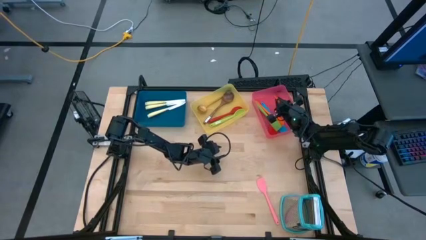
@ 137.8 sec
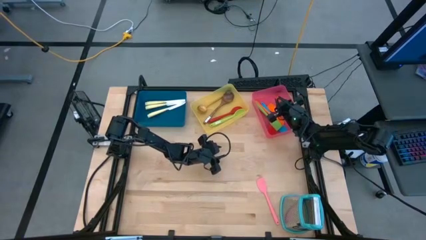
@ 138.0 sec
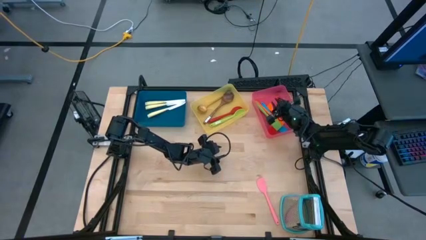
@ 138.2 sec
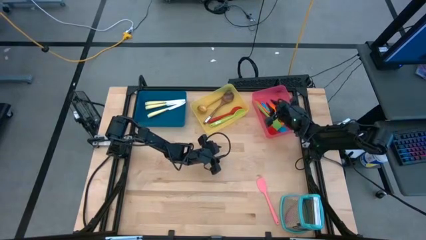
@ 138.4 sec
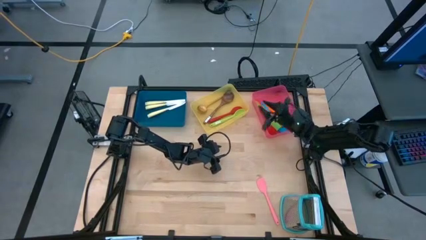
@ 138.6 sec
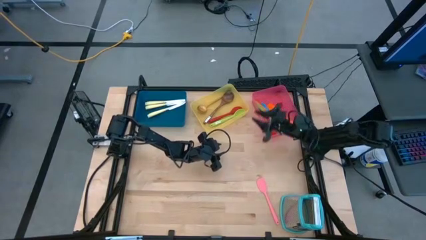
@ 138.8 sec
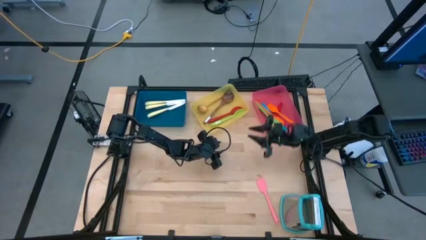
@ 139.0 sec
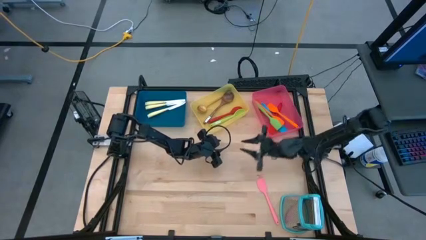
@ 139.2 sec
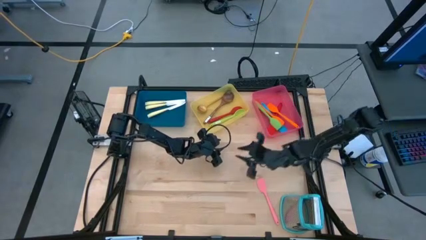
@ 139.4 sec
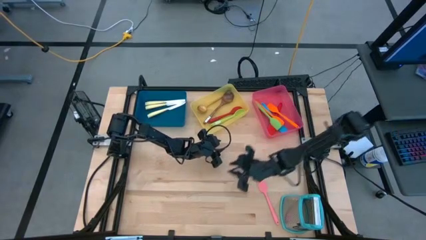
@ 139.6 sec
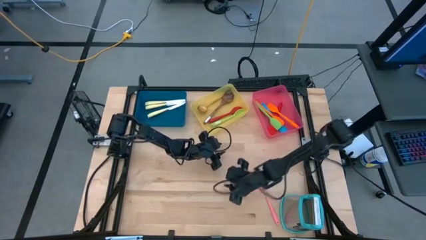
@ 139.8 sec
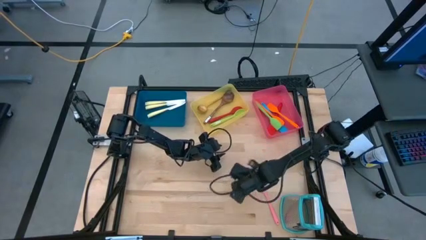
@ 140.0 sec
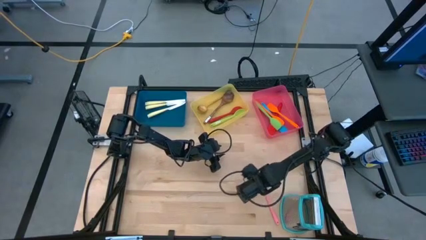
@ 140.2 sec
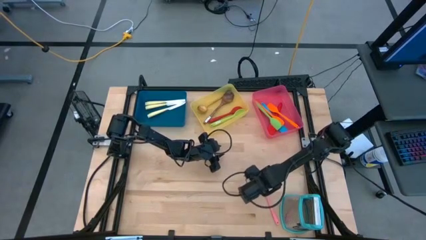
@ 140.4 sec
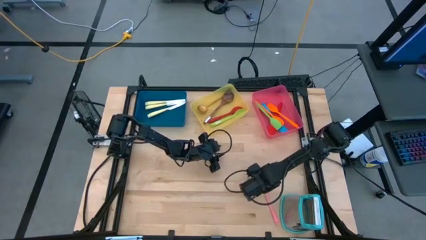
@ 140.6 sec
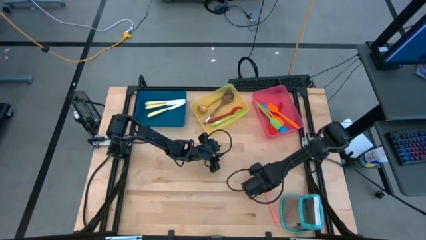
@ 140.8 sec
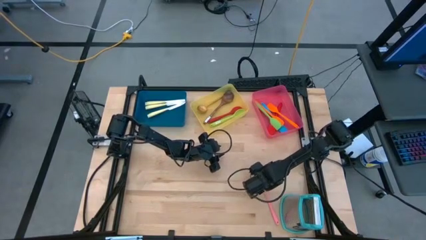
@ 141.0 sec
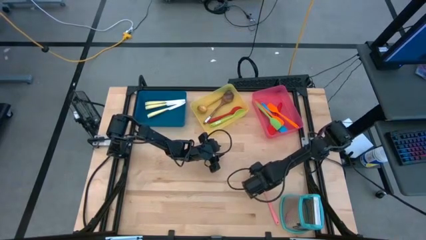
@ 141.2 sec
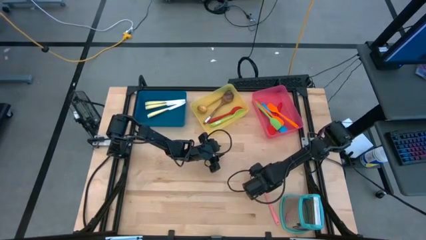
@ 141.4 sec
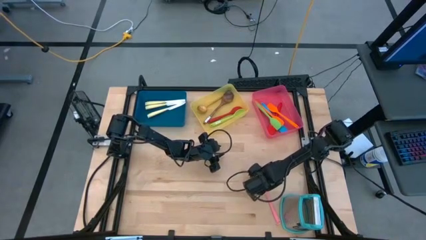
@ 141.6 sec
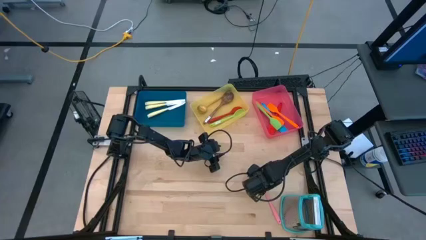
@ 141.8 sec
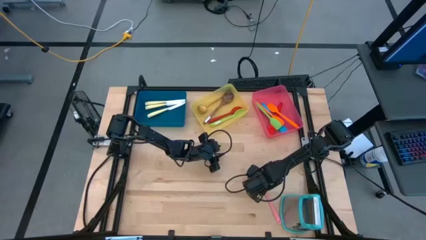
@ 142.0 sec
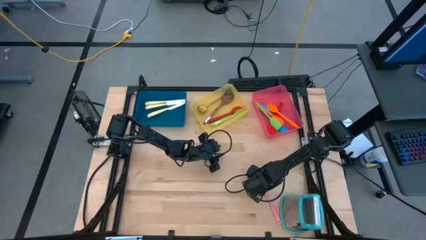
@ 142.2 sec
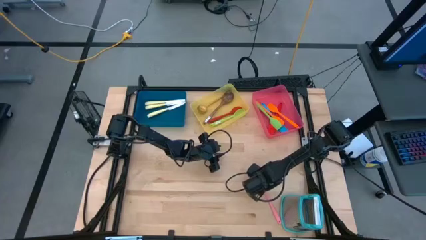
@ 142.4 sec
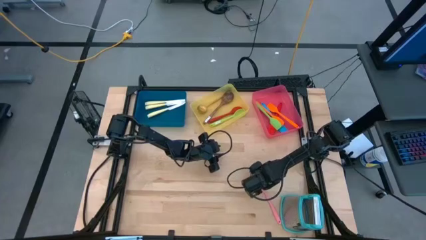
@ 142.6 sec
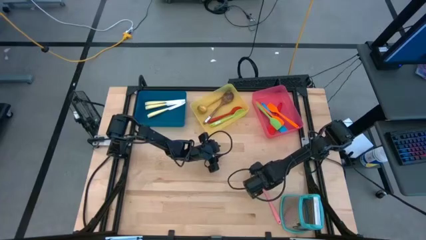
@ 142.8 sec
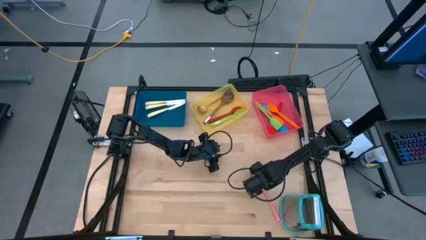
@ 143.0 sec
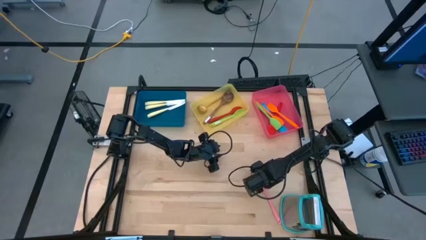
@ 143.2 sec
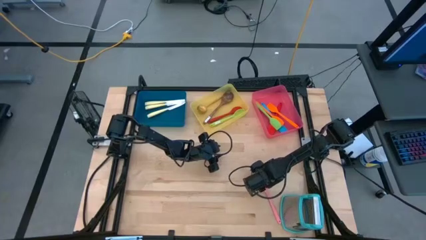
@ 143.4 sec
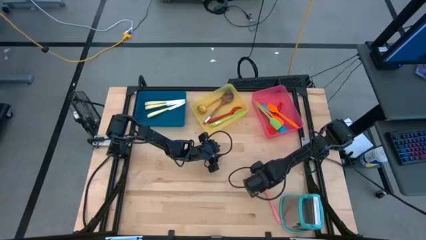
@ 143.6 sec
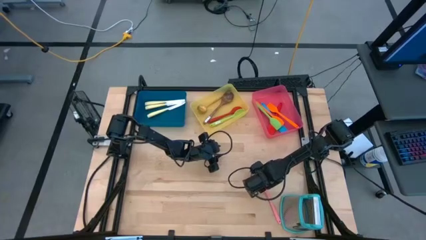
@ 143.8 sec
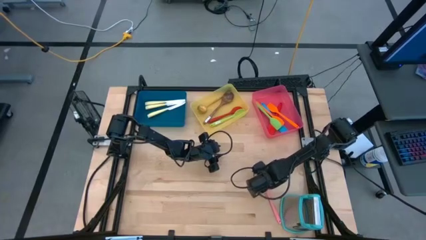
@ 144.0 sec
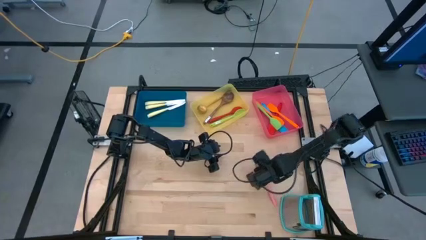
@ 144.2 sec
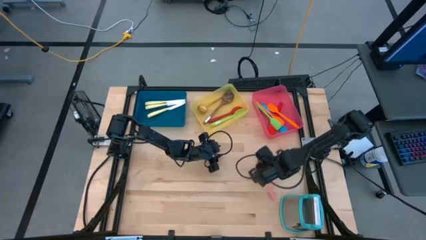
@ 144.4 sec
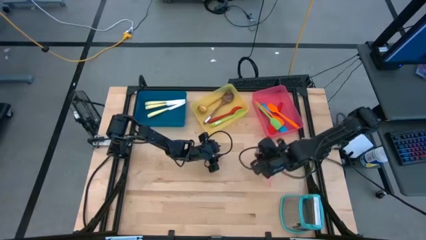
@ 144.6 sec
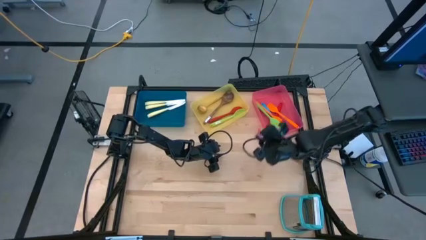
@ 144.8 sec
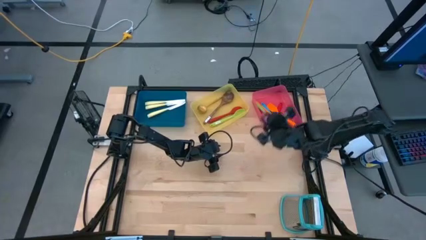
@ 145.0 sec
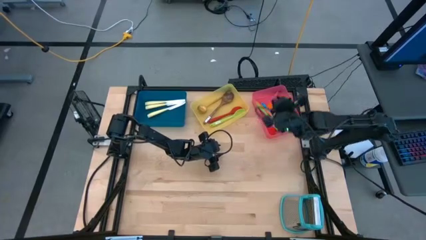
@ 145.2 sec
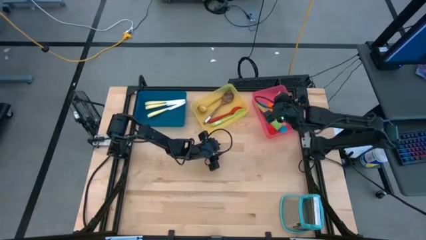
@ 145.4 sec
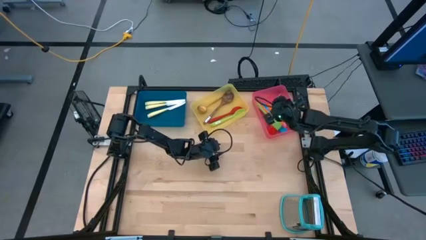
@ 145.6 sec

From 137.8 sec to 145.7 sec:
Task: Pick & Place Kitchen Items
Put the pink spatula into the red bin

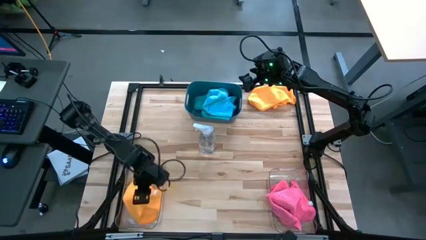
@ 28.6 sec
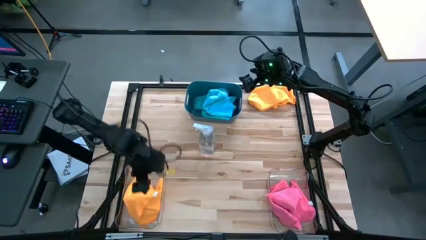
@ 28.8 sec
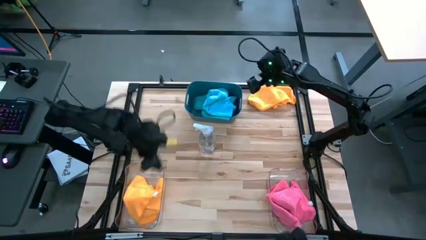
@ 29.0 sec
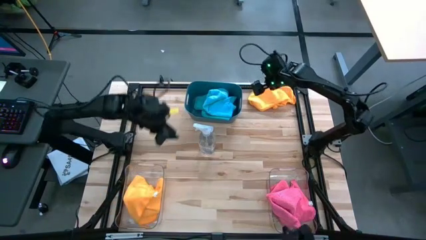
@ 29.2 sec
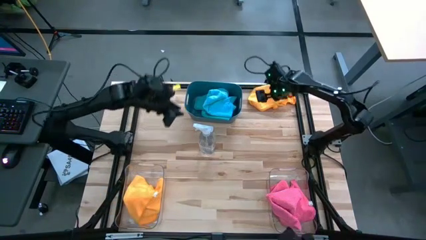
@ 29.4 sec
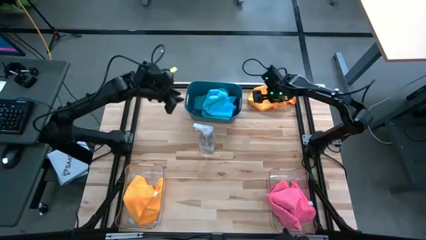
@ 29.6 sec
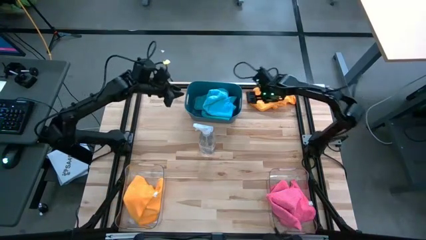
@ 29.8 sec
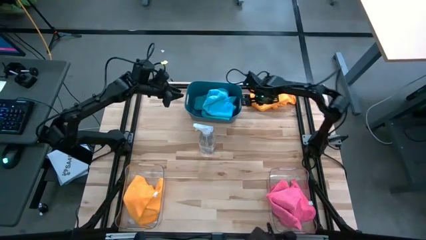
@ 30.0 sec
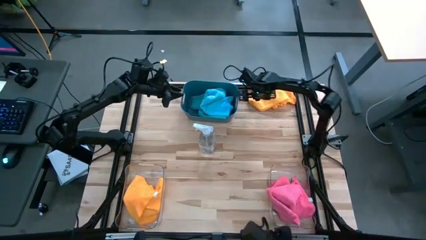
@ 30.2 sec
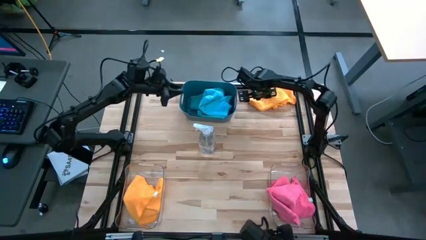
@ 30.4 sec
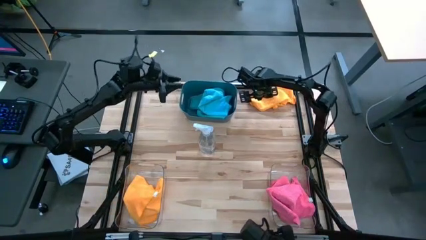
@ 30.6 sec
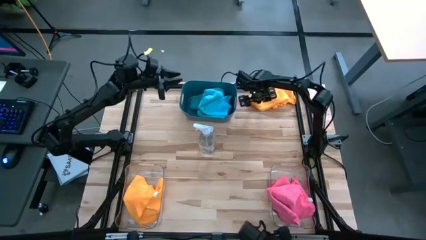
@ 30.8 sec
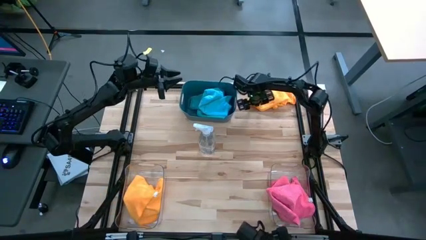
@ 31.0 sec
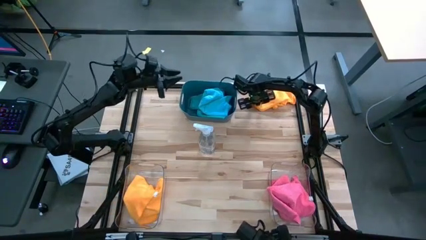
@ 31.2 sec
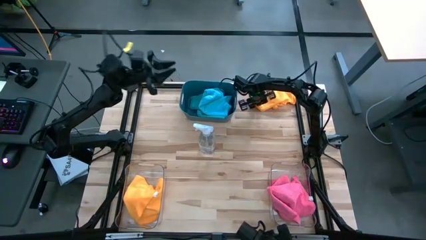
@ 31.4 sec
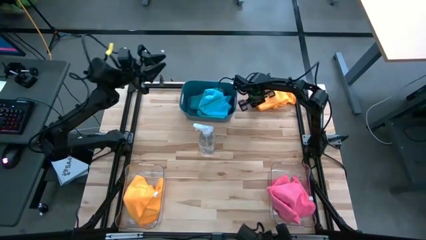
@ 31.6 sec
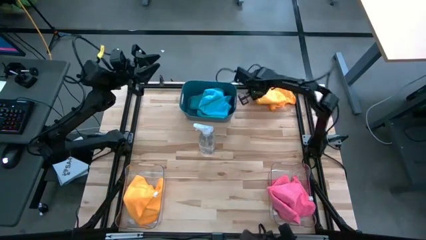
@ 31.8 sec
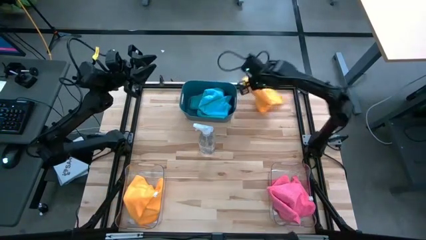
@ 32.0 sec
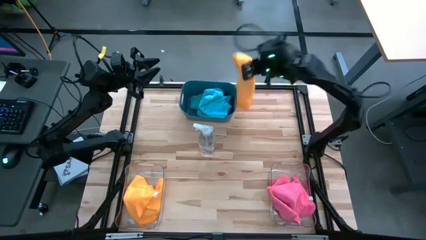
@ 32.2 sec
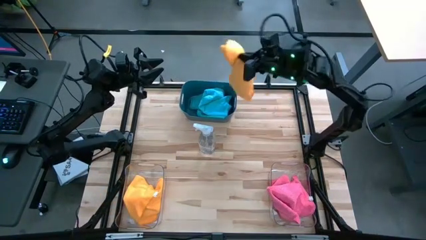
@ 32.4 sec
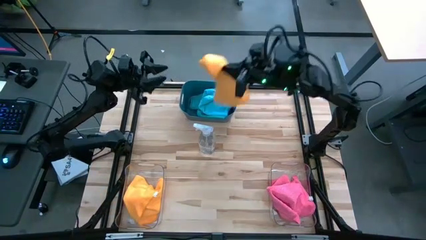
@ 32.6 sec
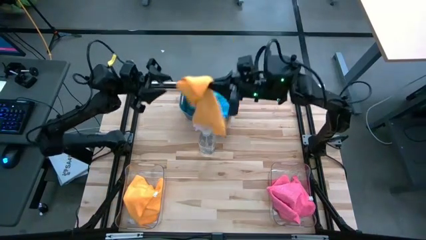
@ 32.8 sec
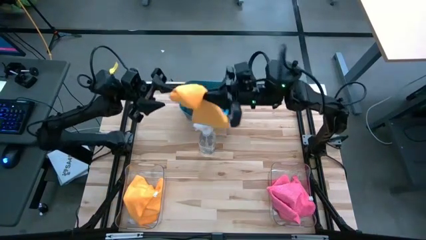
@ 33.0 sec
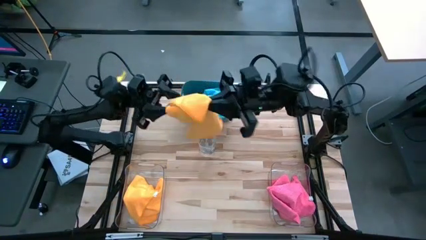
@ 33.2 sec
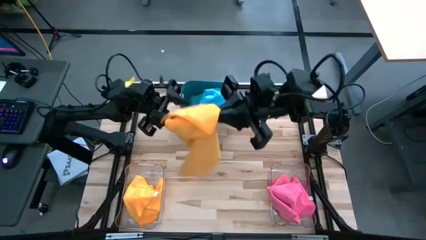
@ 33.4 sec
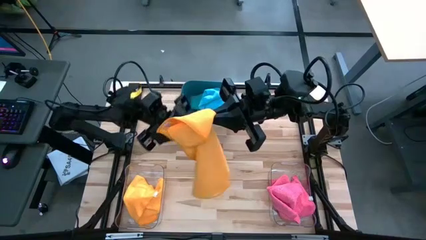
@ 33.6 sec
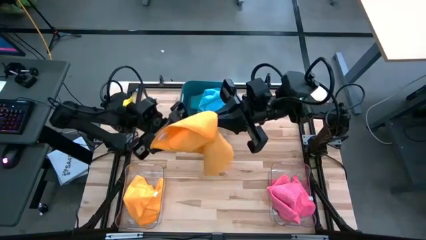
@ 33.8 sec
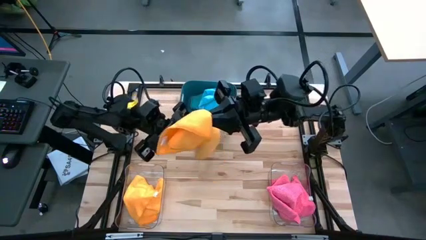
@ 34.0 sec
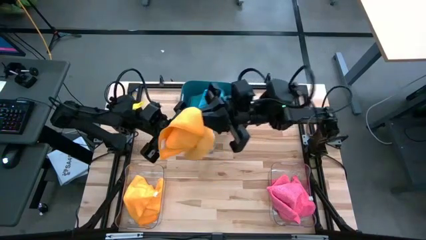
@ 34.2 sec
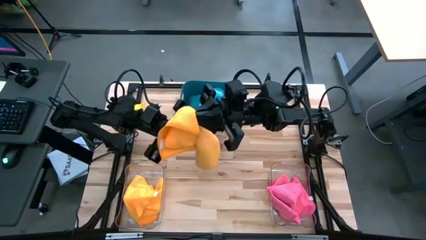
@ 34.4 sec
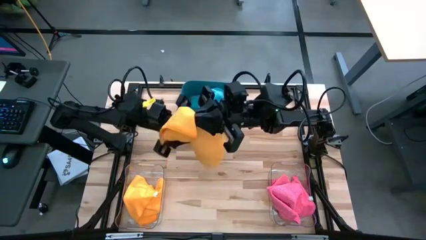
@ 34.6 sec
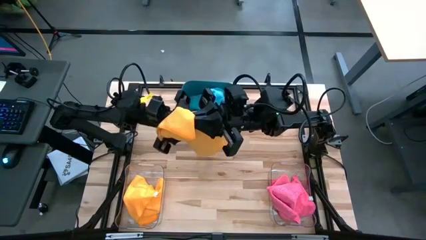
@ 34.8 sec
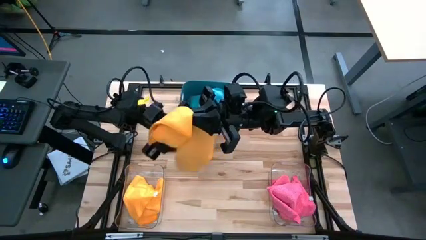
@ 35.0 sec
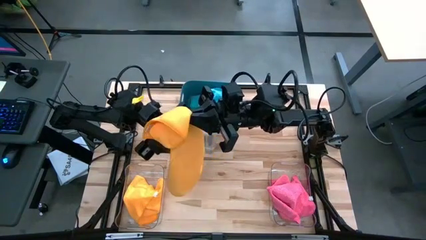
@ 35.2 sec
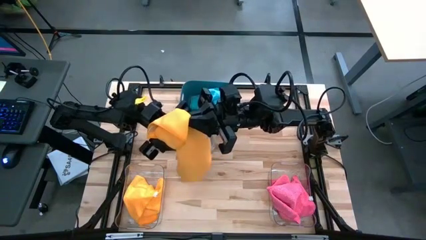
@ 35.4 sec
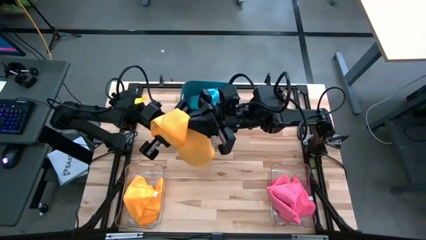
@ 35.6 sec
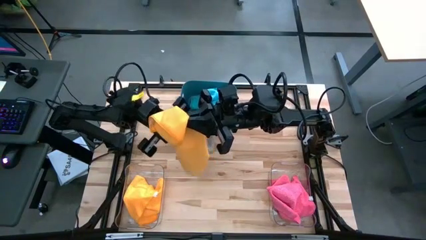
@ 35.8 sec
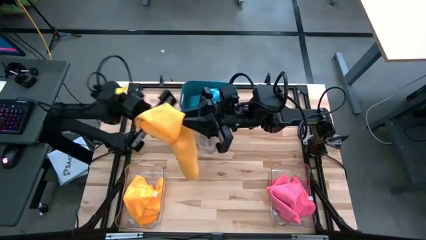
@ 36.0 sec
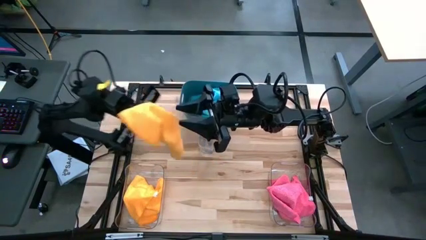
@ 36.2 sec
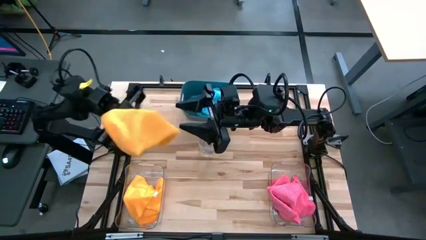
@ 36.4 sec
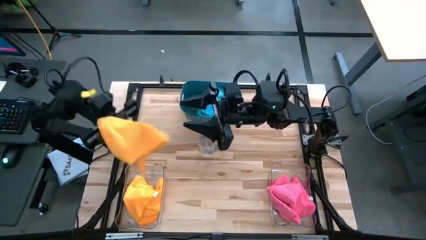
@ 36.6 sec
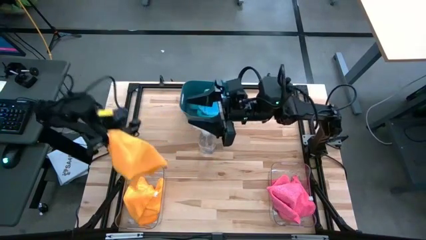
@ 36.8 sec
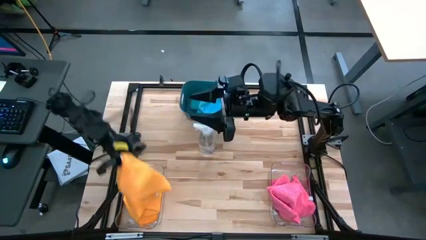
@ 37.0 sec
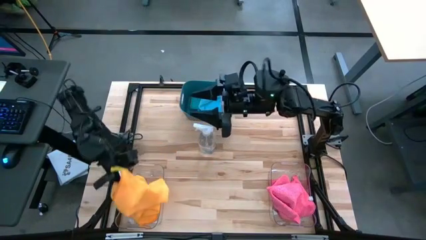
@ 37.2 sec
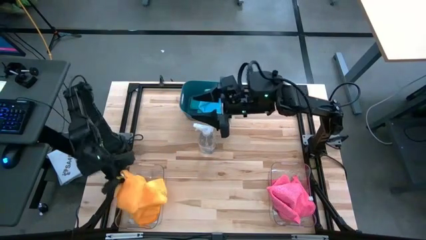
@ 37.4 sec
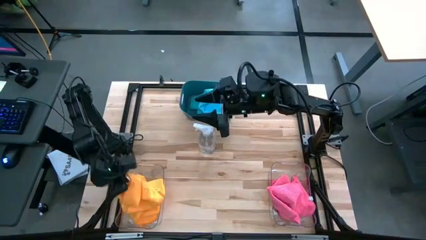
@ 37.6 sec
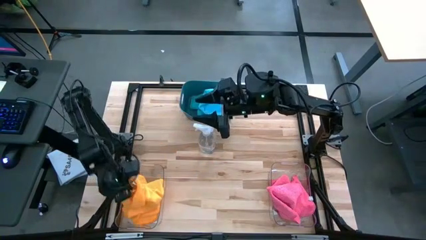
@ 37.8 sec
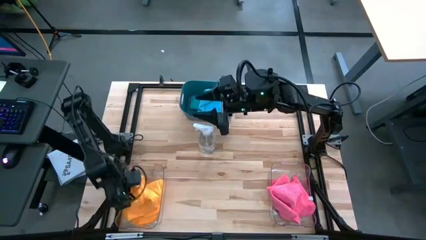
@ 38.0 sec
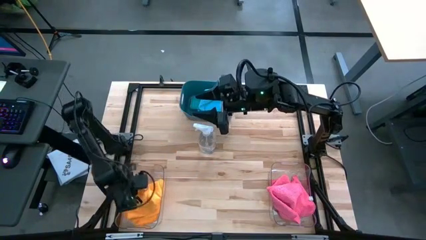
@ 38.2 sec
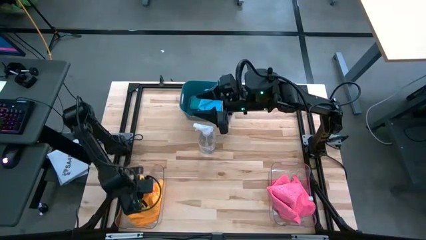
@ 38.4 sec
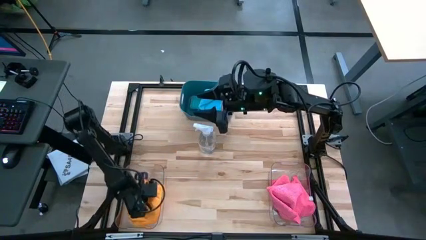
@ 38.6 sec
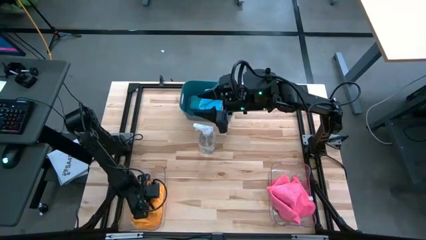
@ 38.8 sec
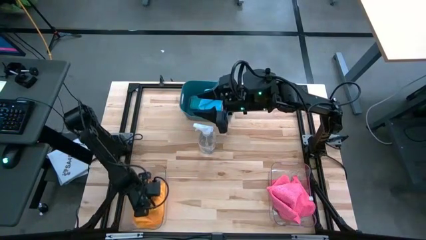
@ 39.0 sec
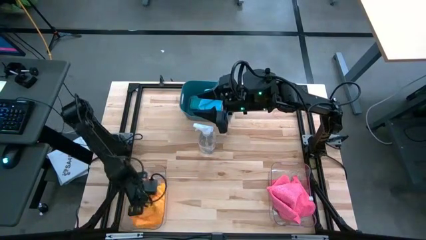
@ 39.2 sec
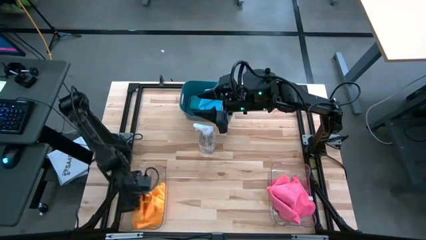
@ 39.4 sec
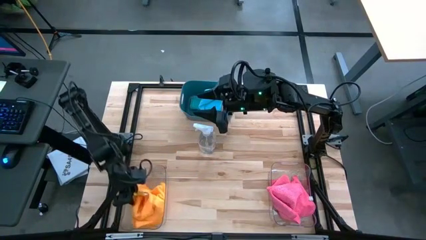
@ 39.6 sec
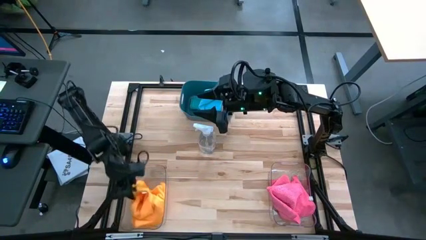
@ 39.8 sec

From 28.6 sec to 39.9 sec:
Task: Sort microfiber towel by color & place in baskets
Put the orange microfiber towel into the left transparent bin
